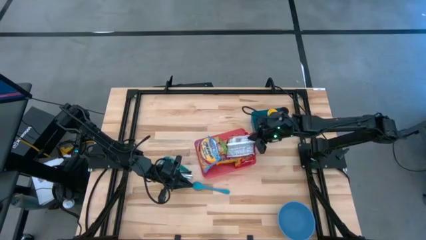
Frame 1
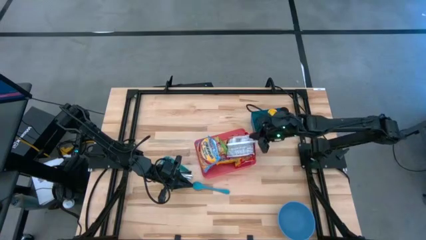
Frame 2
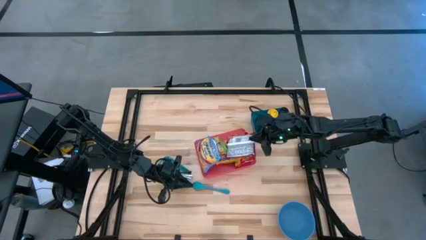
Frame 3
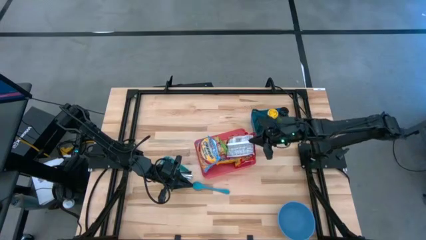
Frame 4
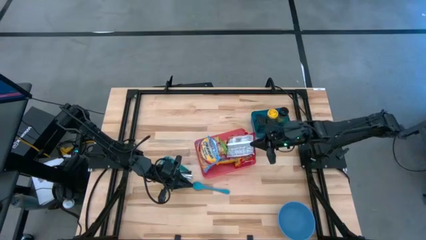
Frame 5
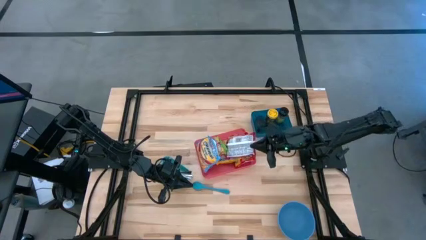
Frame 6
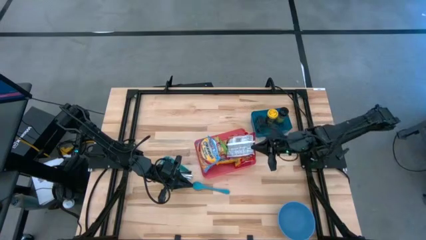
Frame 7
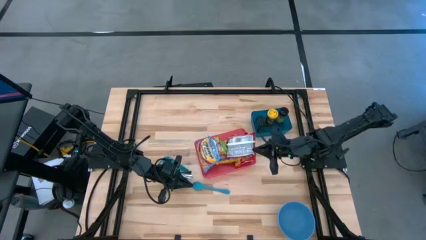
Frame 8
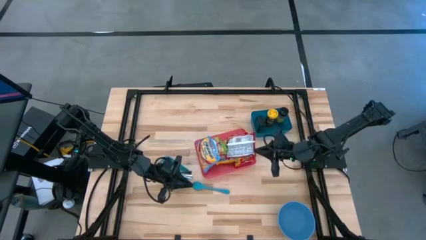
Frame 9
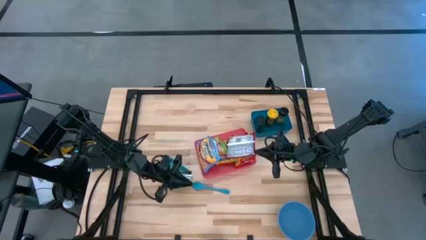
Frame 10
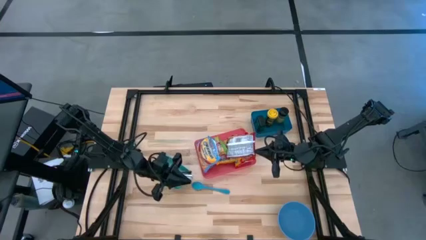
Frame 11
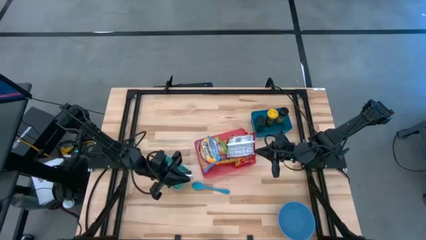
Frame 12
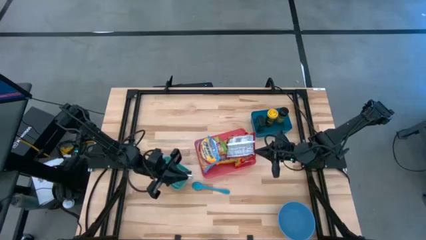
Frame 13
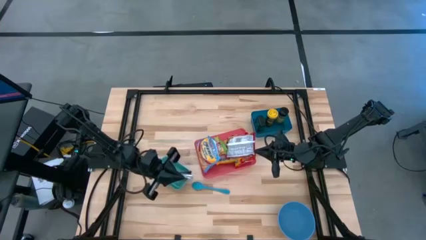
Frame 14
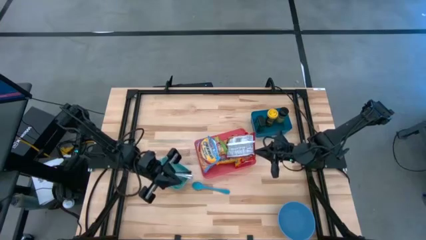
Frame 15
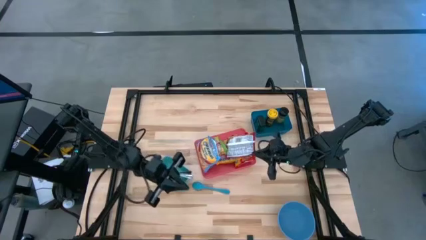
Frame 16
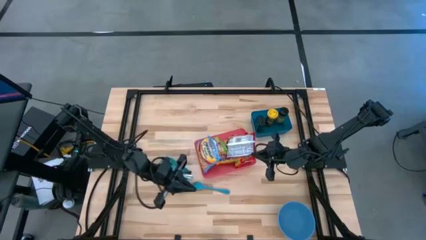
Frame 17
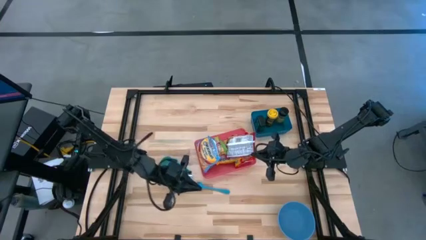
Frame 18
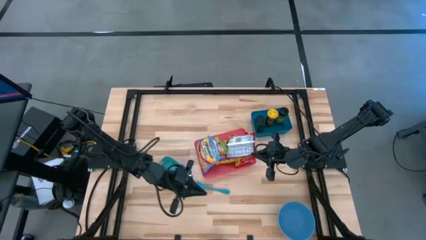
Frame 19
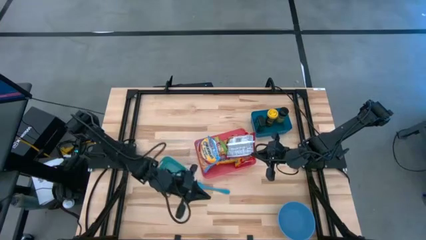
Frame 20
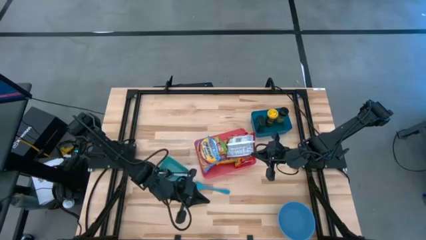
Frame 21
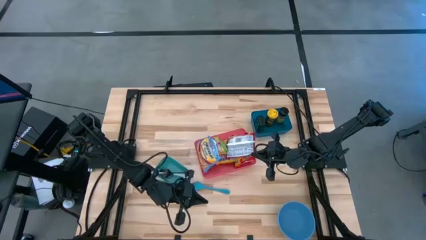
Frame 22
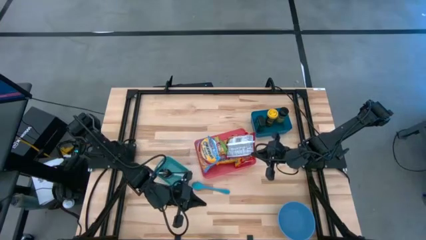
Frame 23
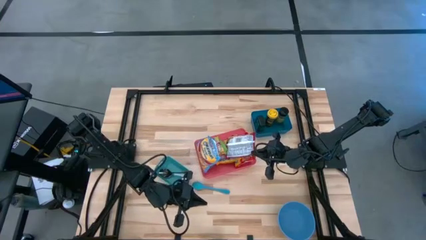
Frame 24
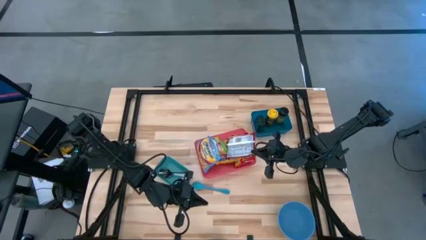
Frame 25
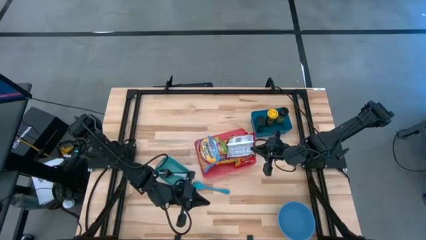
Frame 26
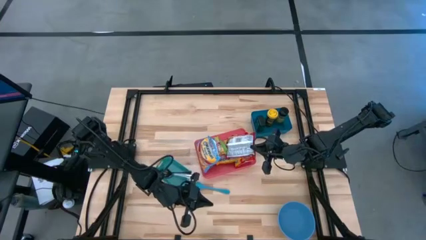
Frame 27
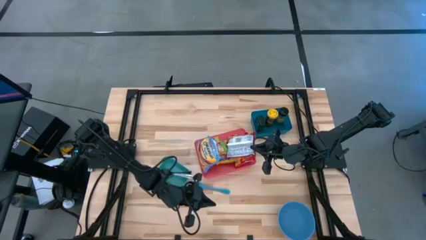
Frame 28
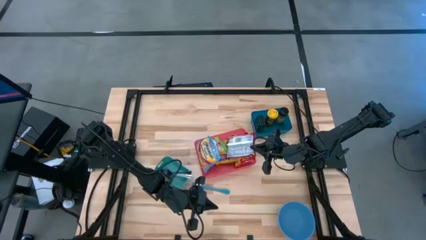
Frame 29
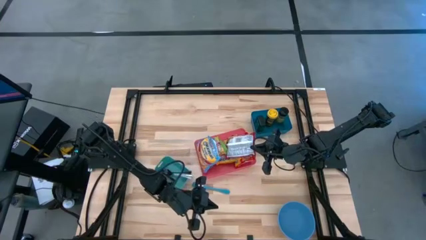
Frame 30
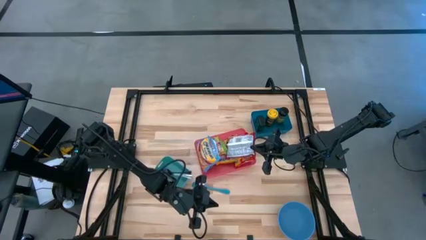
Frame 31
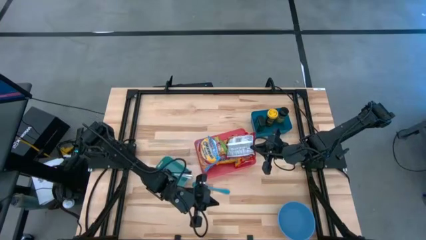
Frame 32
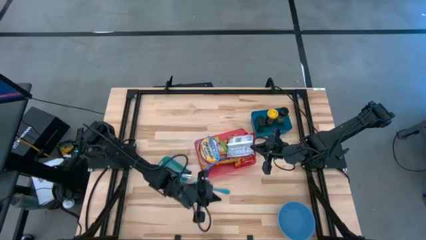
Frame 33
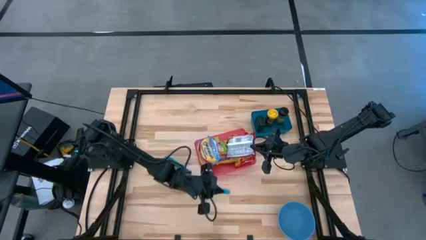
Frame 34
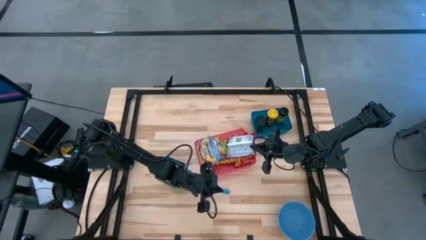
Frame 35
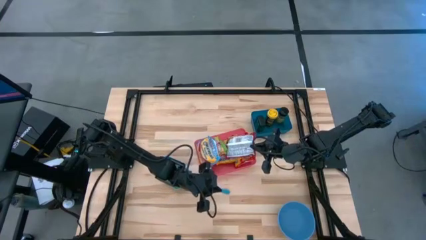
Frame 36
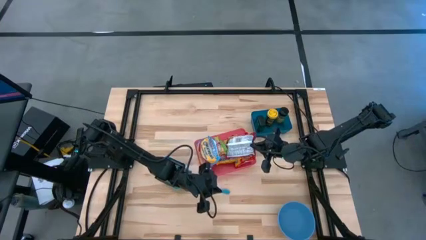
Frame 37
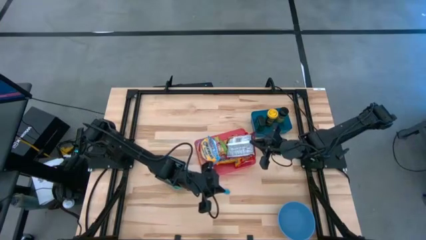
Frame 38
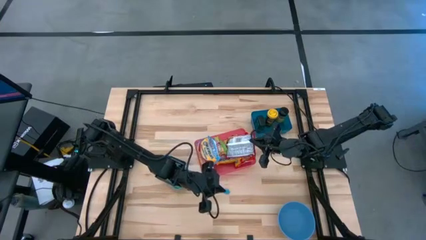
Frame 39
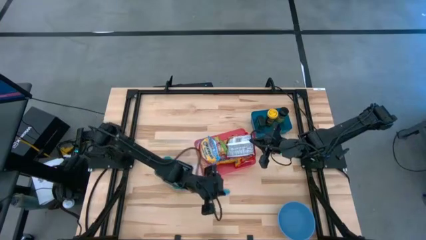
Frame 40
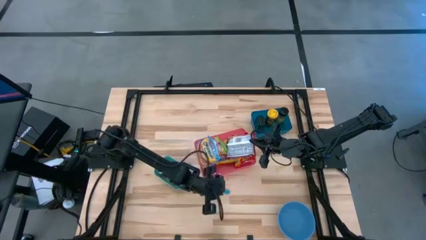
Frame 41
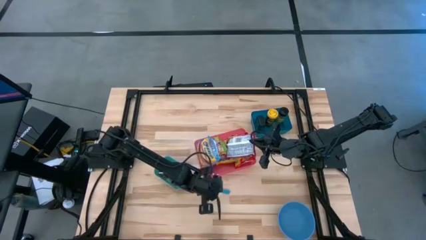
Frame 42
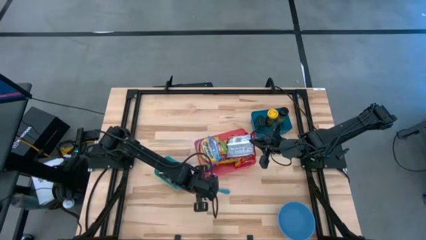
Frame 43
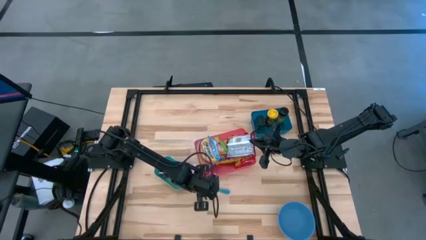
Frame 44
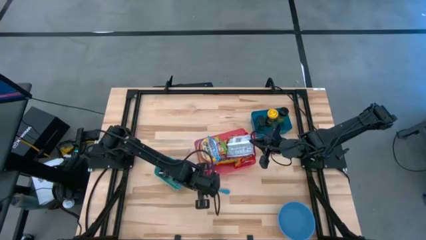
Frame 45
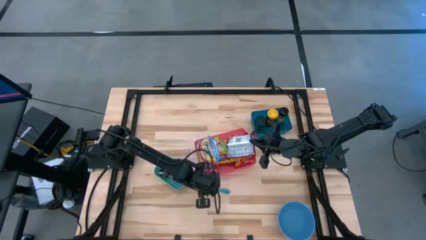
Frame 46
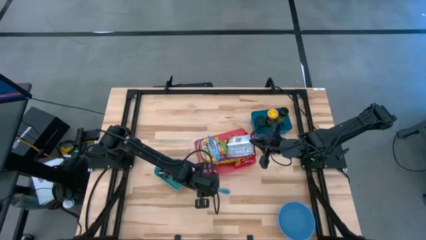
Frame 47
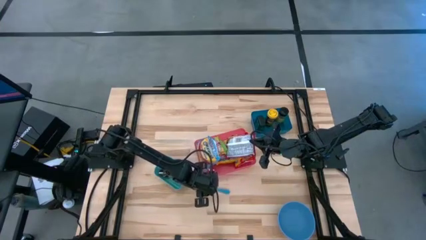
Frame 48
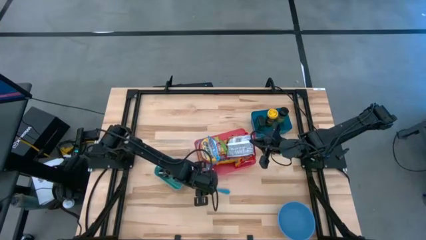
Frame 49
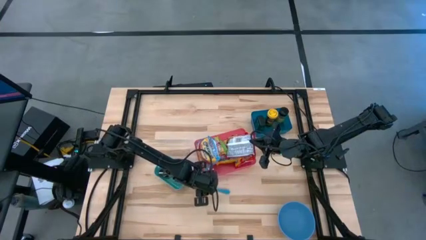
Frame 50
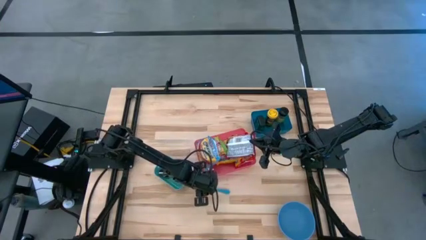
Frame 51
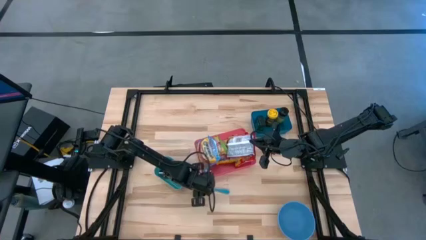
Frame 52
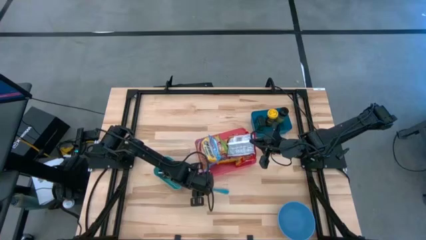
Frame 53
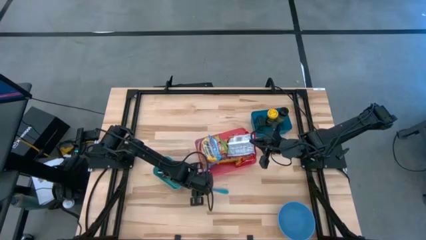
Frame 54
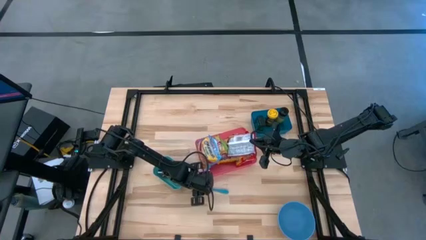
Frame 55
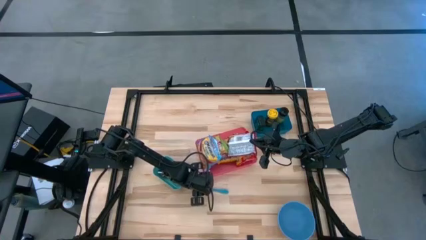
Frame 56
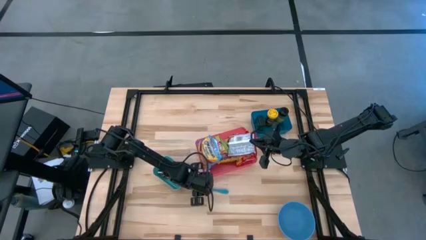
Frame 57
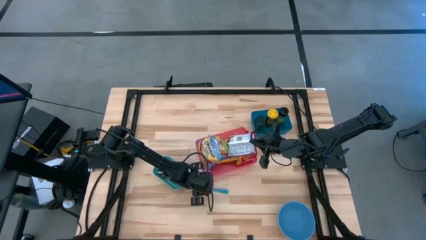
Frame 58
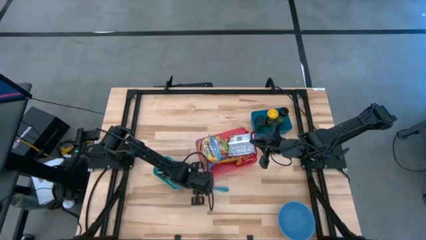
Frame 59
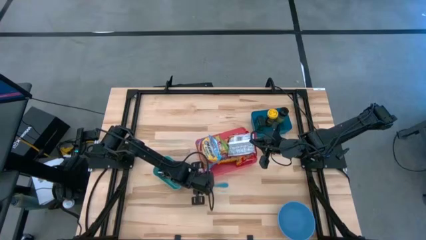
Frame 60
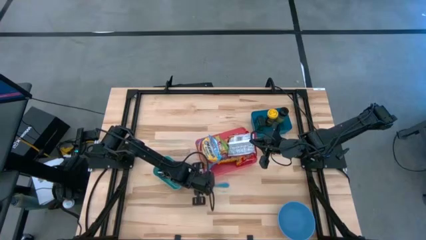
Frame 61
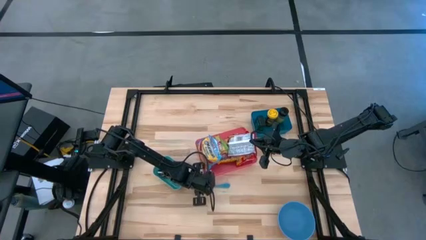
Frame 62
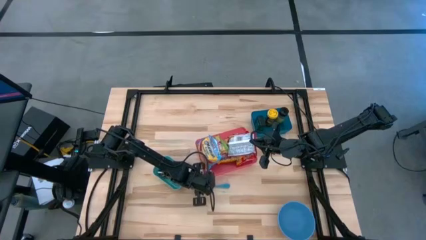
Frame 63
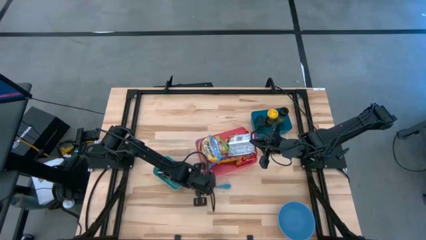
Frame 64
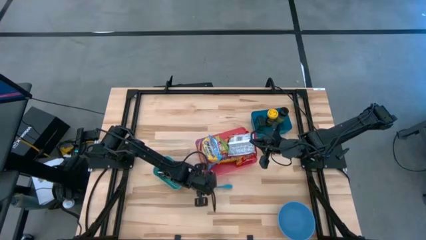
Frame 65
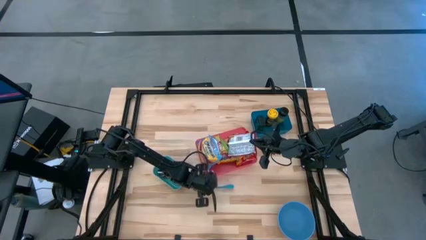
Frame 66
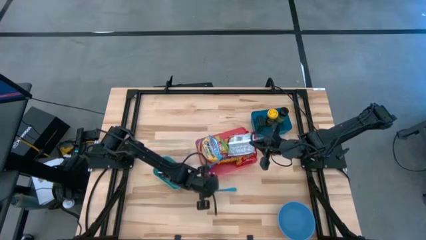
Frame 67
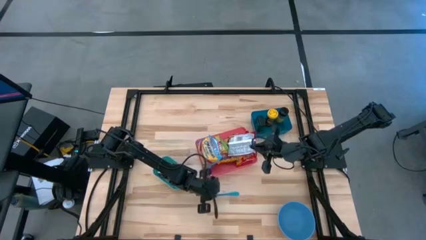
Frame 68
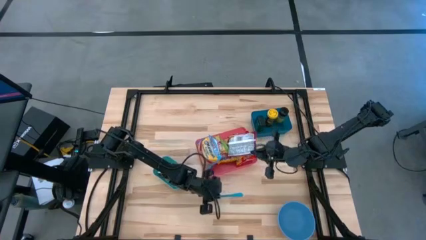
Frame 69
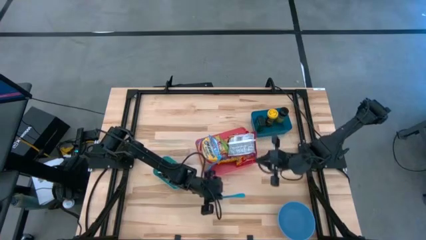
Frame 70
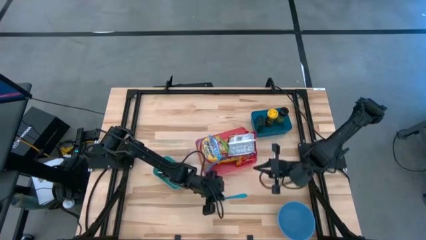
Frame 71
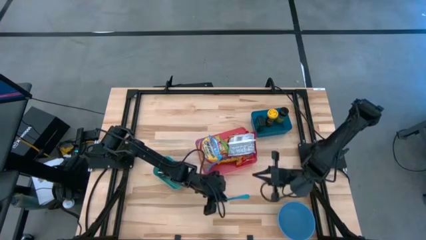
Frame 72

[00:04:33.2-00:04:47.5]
Task: Pick & Place Food Item
Put the blue baby spoon into the green bin
